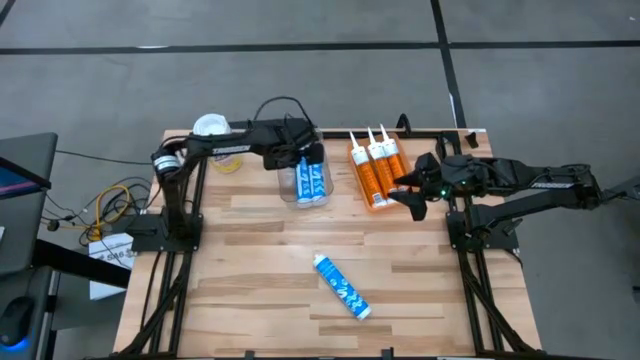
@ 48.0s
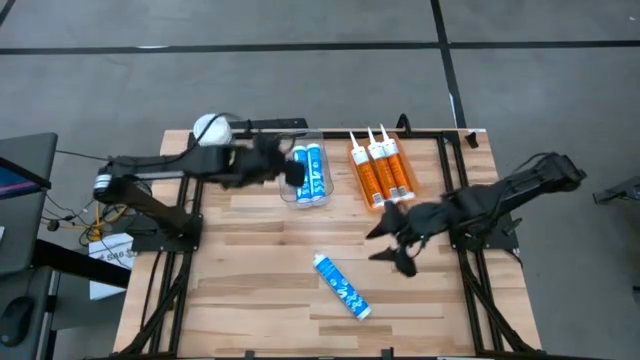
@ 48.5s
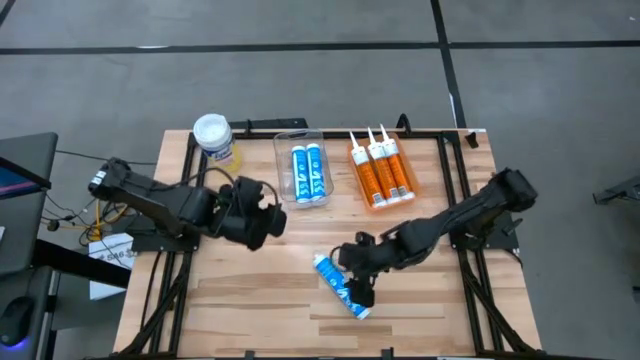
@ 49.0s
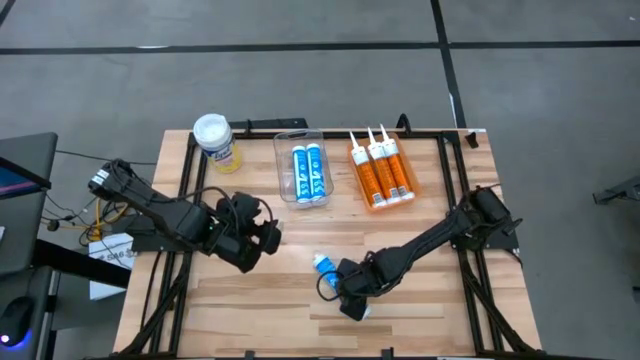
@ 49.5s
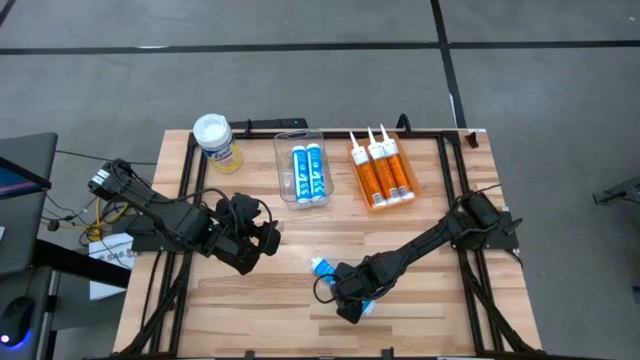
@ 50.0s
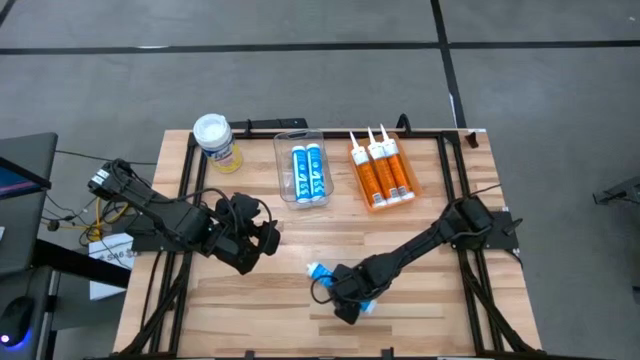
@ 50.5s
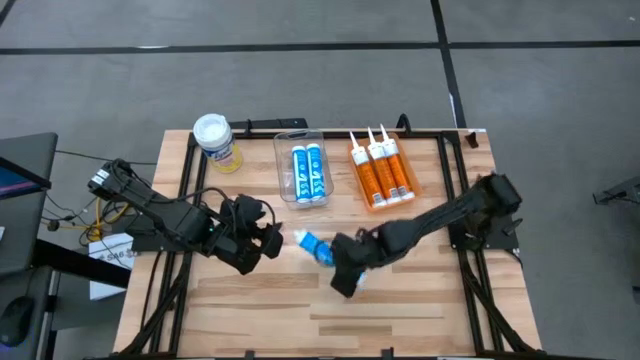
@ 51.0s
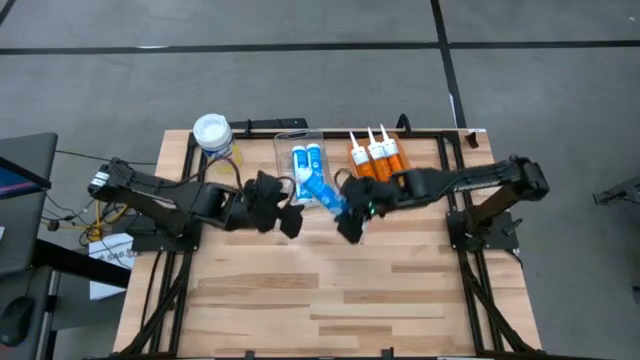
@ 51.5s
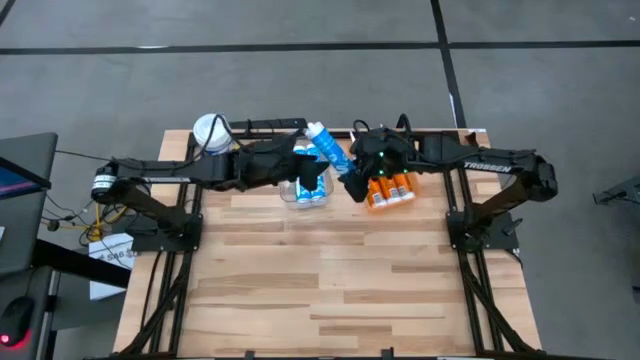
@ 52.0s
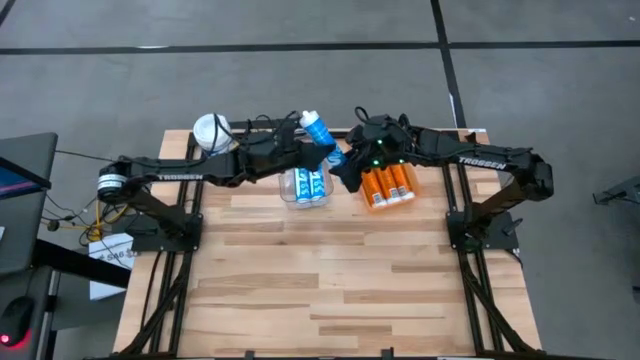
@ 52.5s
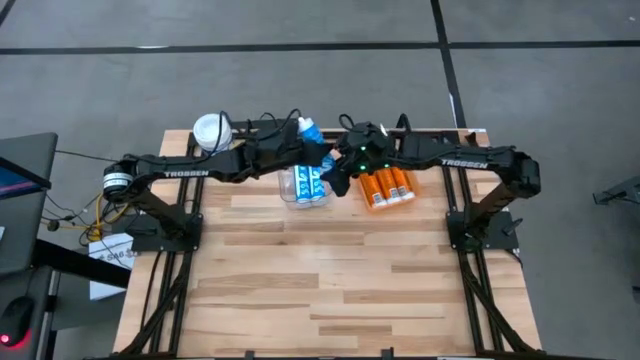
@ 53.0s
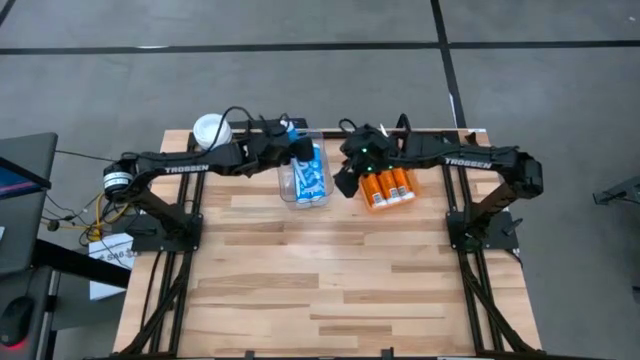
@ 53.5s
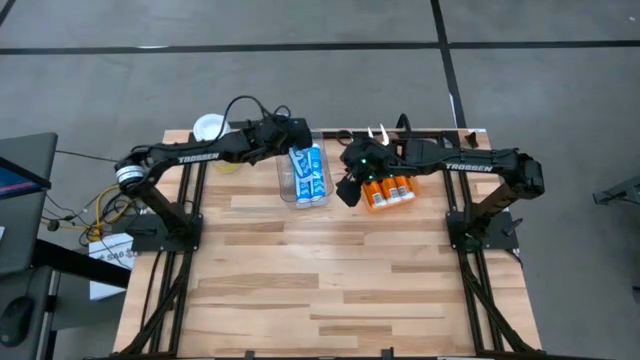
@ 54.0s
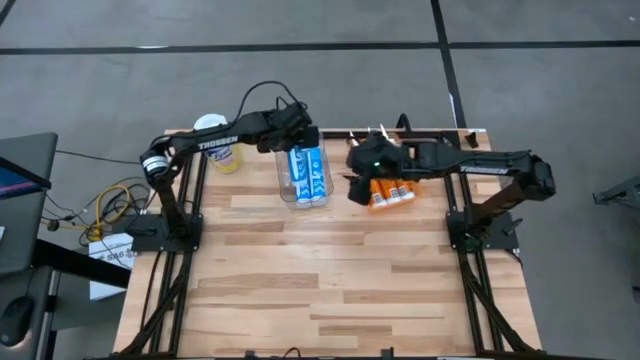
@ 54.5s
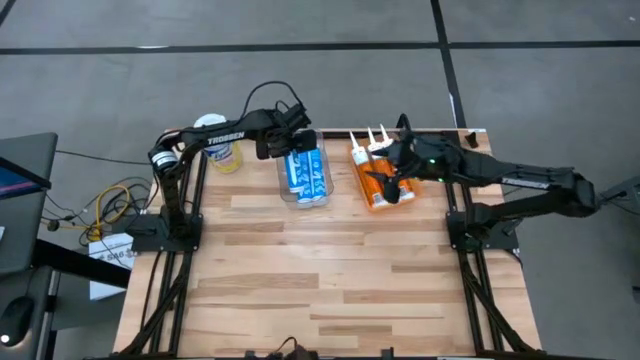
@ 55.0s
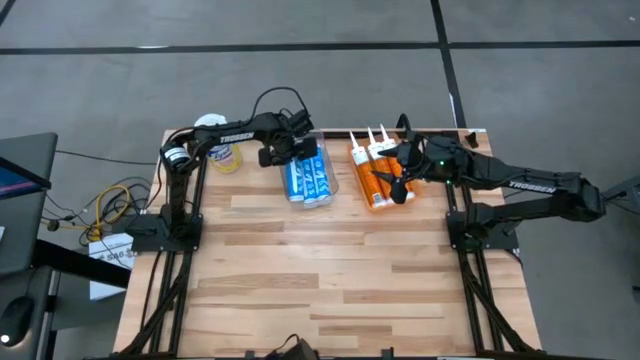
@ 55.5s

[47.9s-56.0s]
Task: Pick & place silicon tubes, Sealant and Lysol wipes
Put the blue sealant into the transparent bin

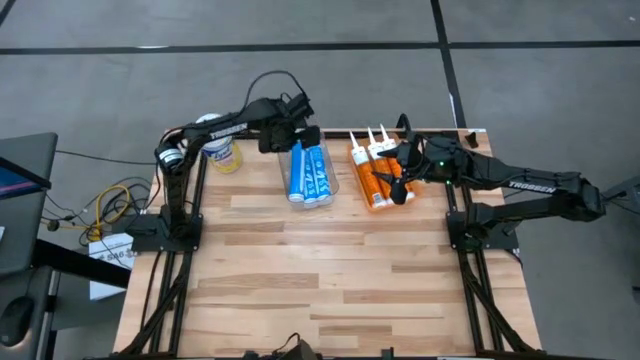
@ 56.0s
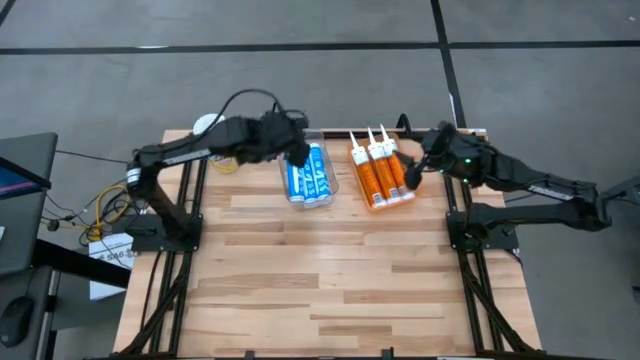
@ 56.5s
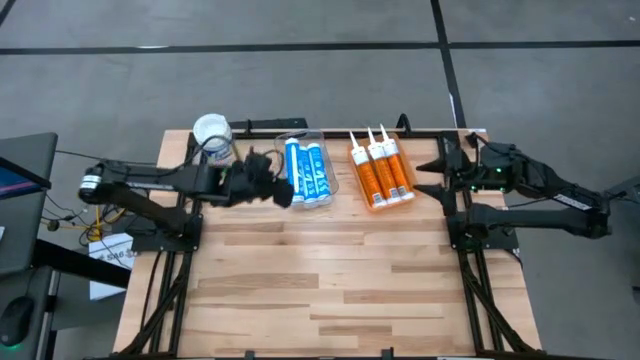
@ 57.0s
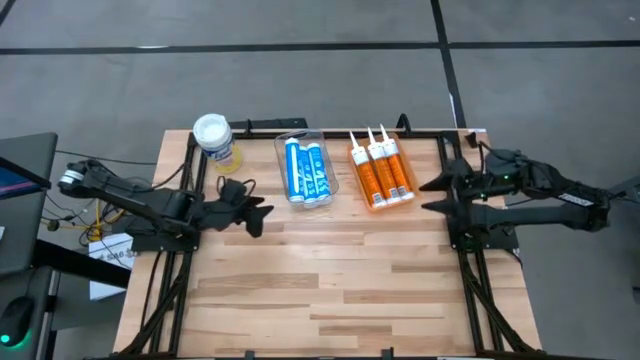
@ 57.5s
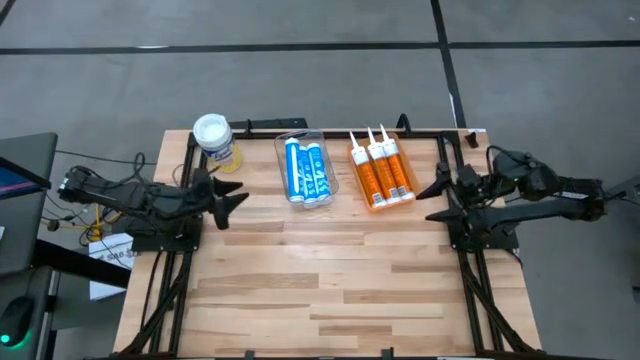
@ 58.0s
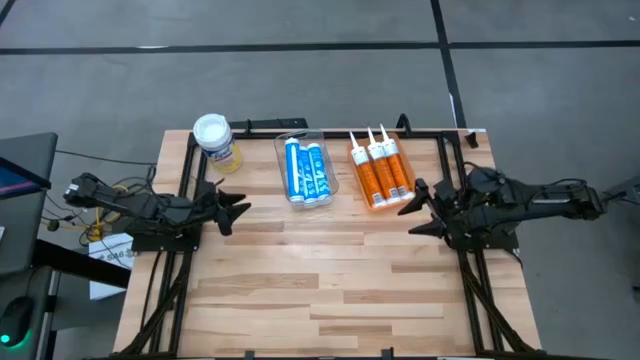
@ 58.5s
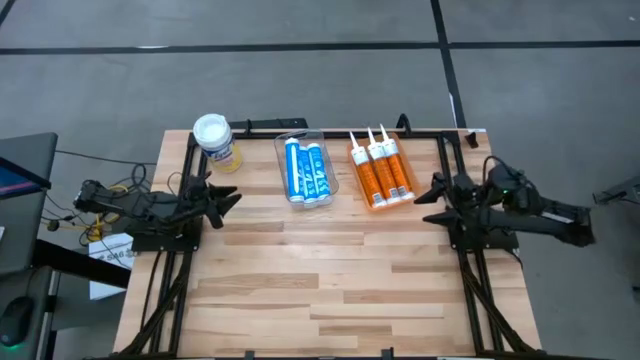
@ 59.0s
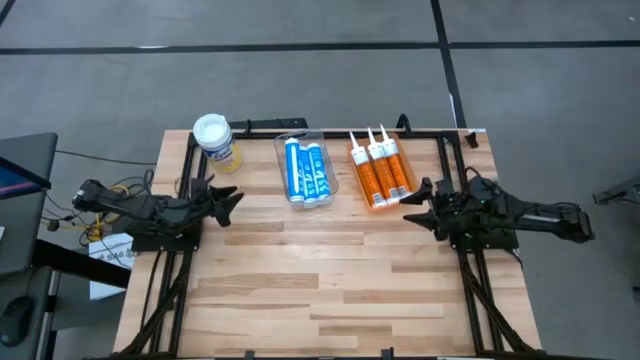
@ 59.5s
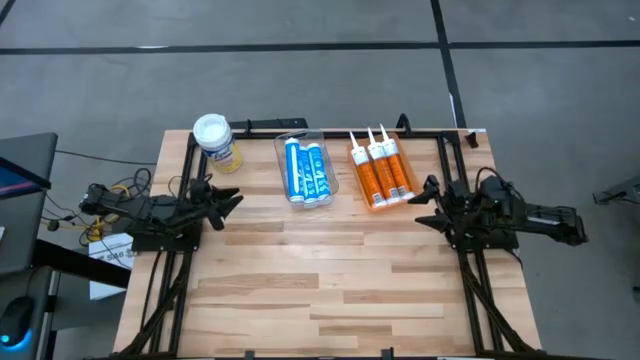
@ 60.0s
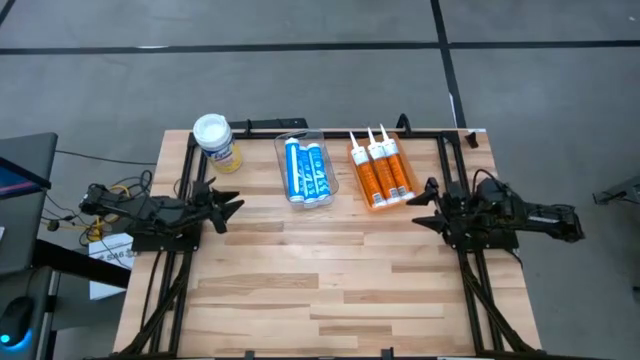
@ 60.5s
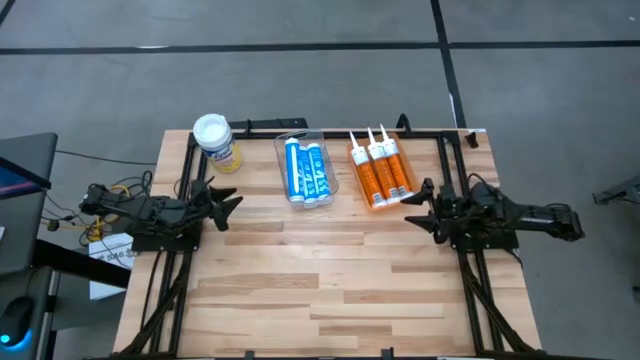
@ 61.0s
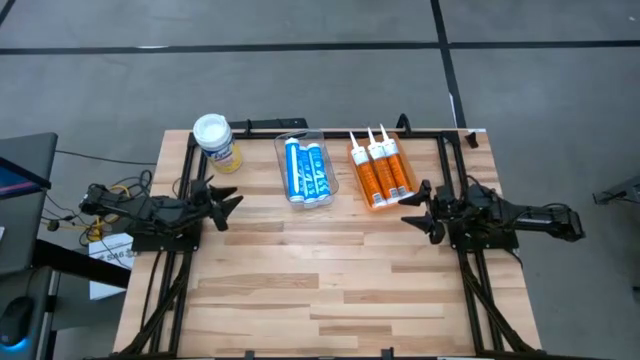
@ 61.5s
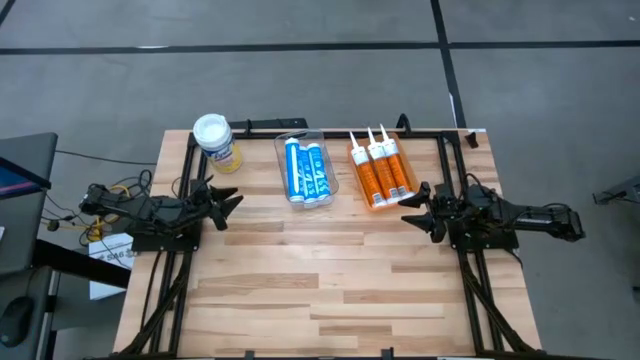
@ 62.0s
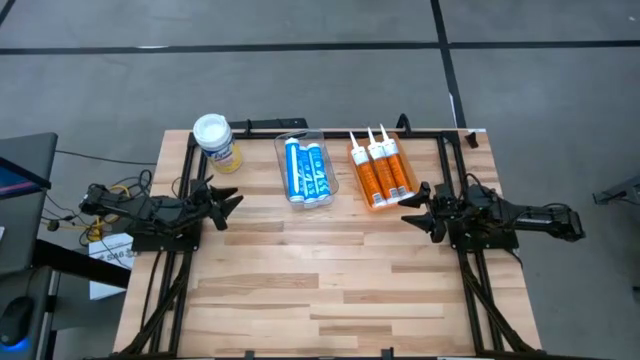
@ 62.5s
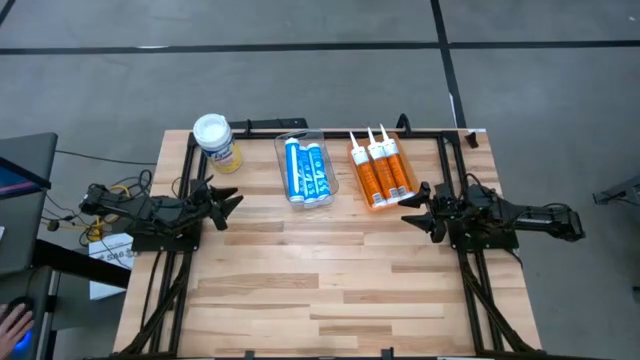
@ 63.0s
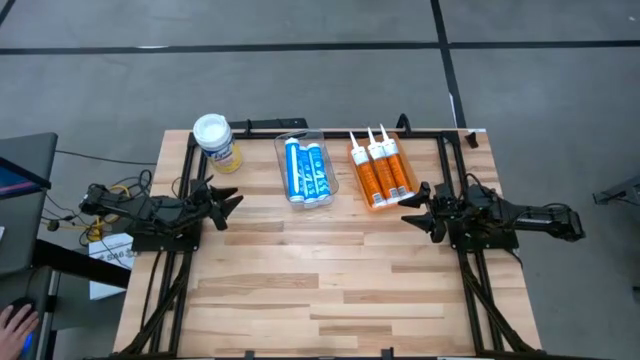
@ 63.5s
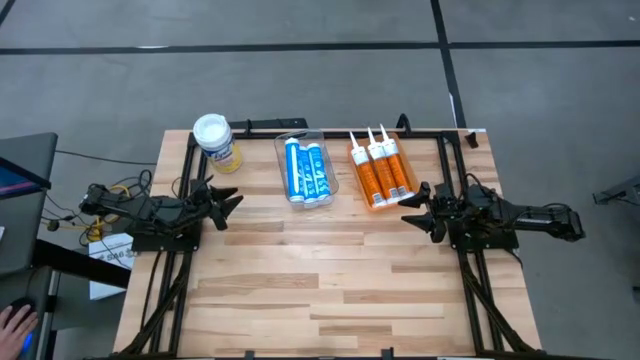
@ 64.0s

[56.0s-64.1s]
Return to Home Position

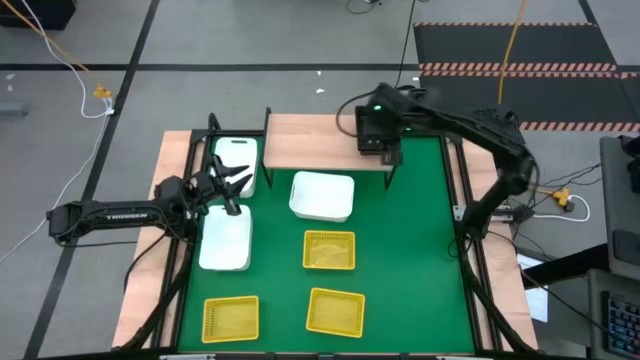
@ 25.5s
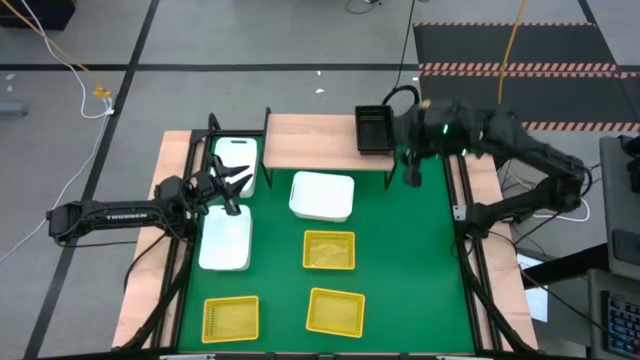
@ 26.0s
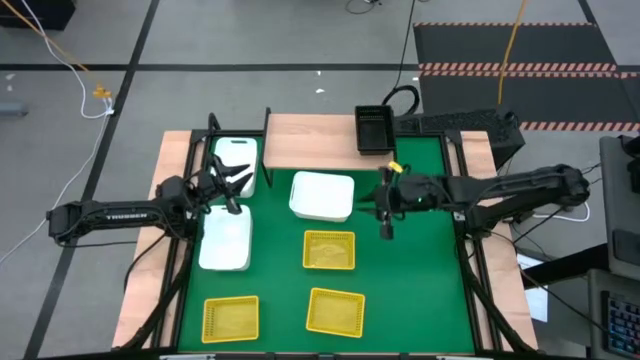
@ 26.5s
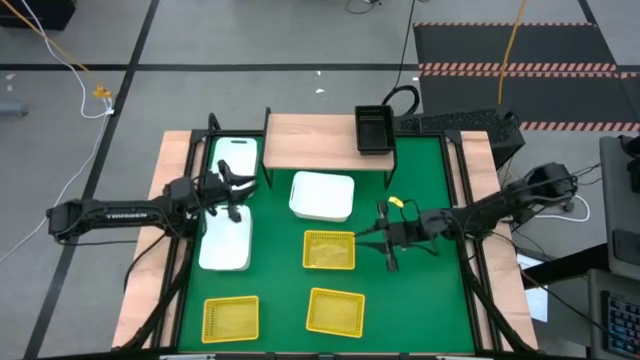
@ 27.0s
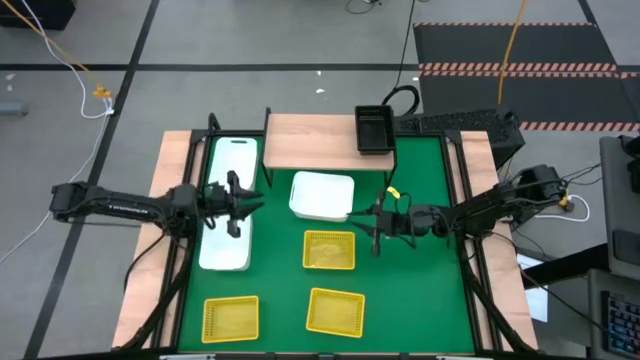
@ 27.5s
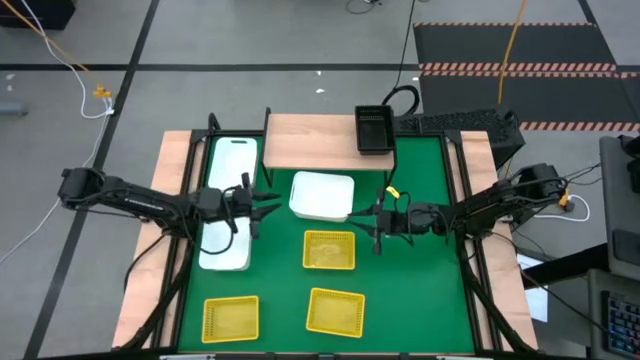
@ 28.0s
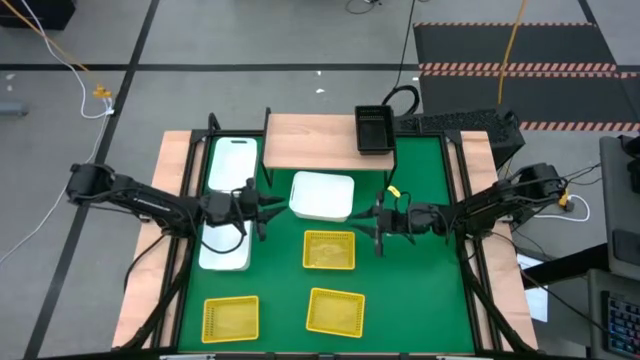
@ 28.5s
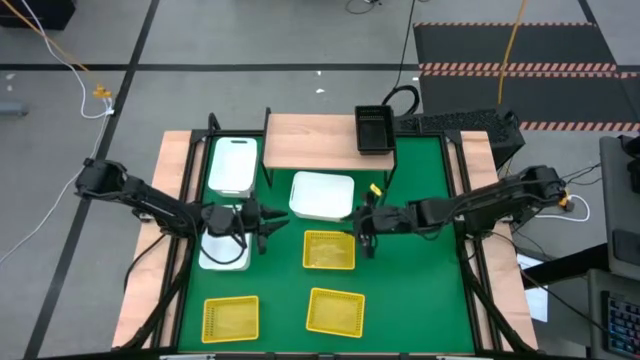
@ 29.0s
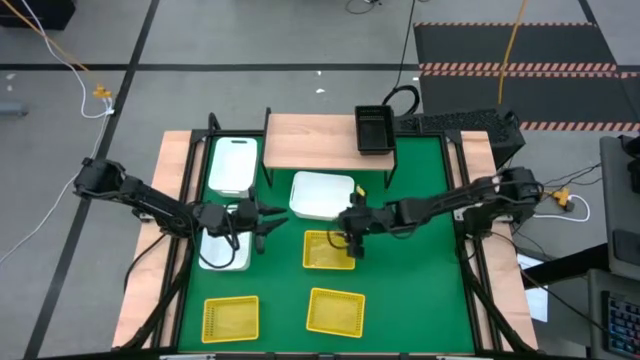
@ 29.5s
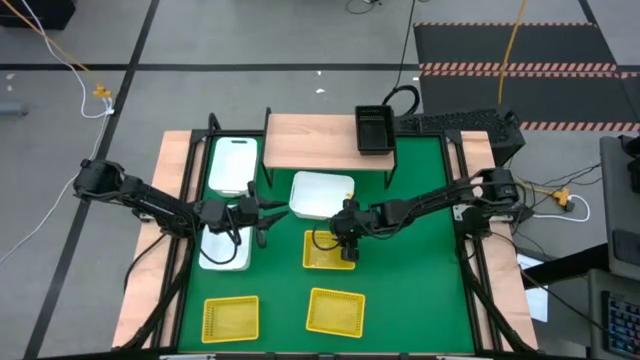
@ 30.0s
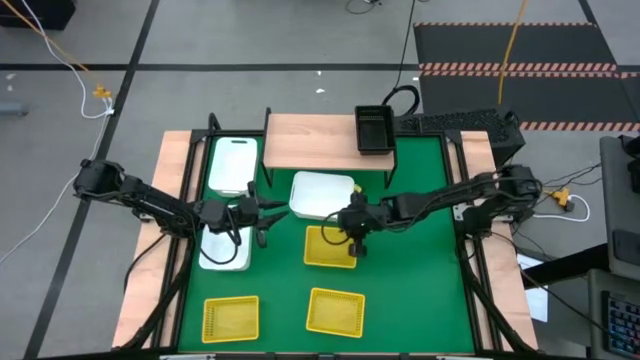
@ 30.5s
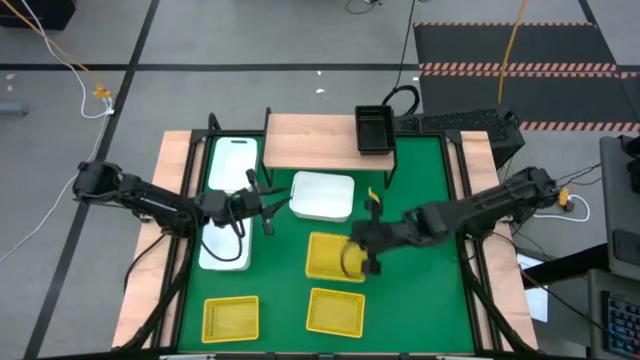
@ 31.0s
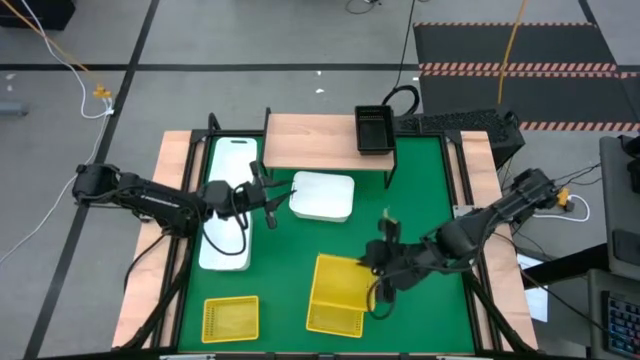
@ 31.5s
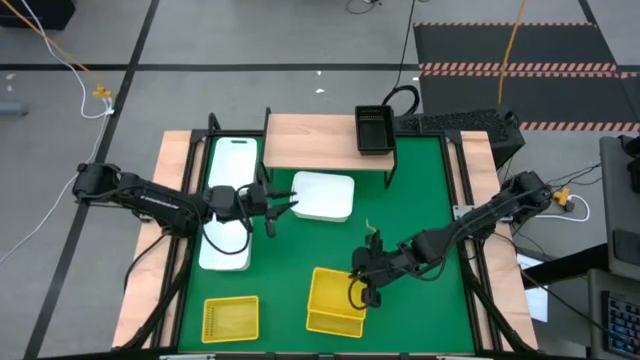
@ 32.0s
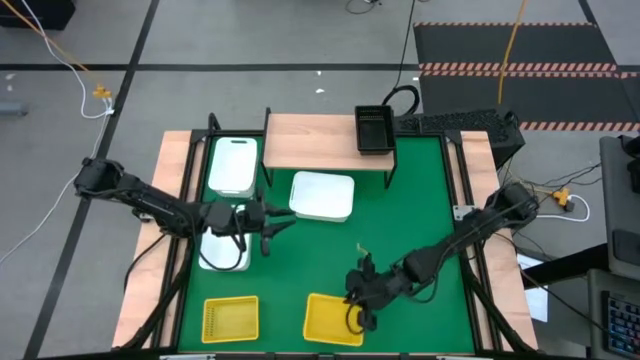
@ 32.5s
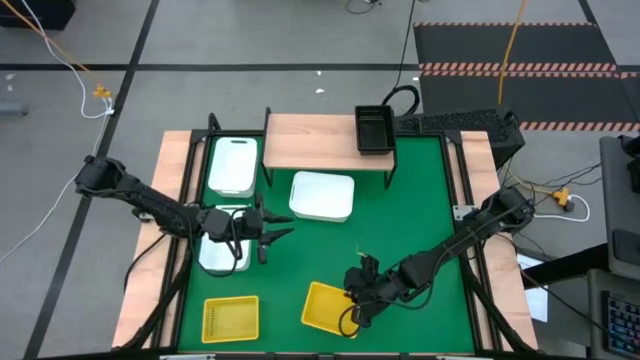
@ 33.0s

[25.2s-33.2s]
Task: Stack baskets on shelf by color
Stack the top yellow bin on the bottom right yellow bin
